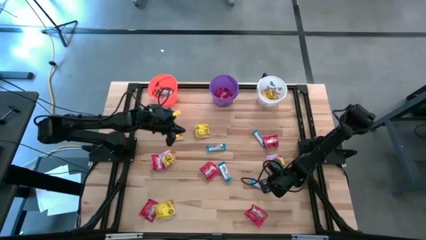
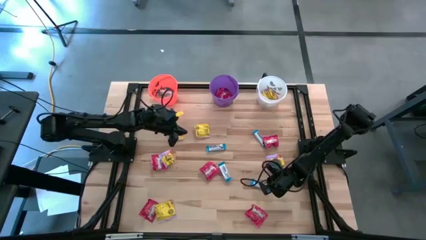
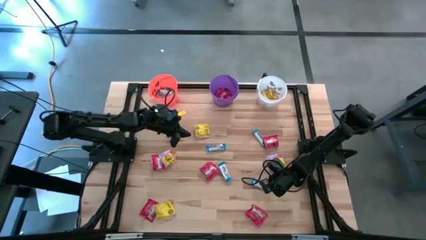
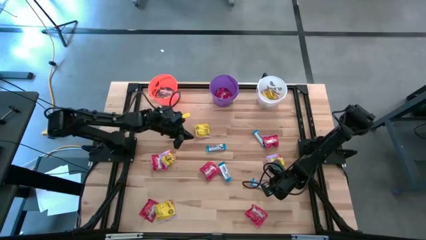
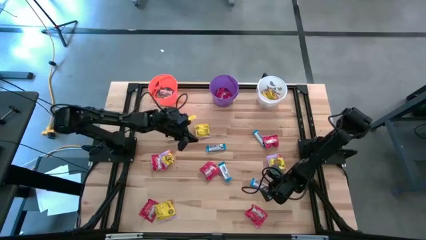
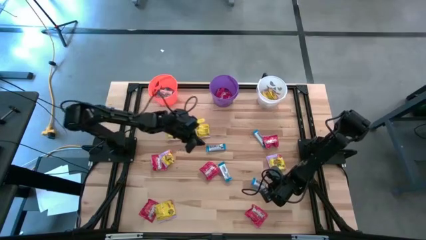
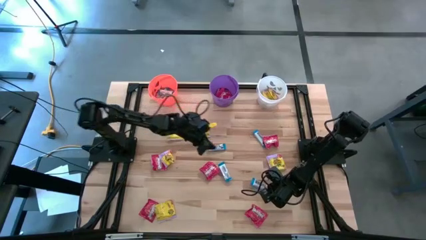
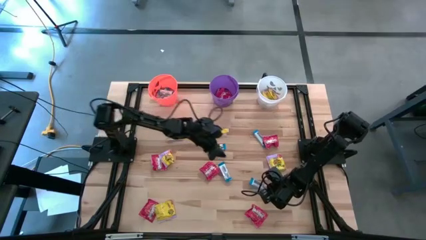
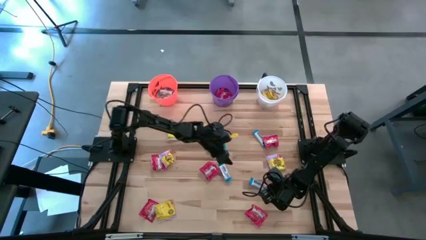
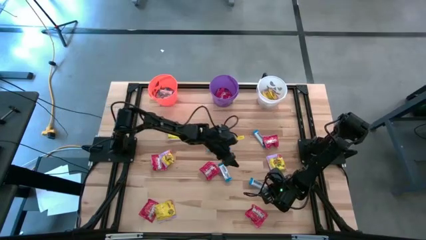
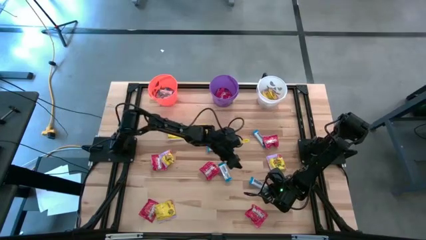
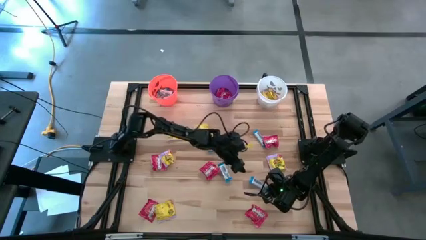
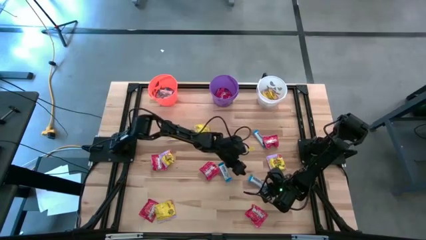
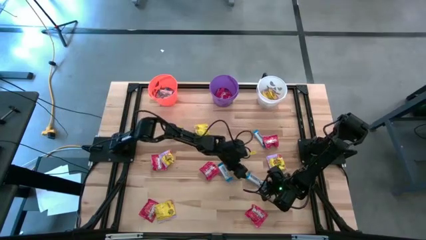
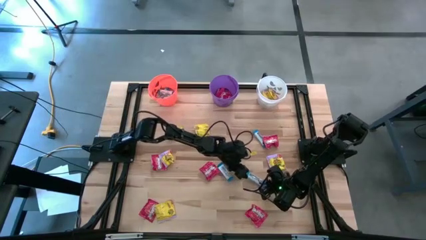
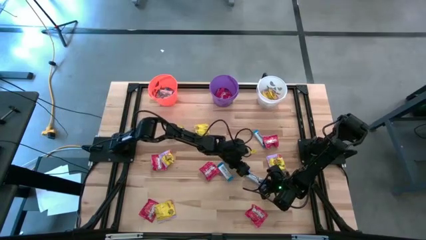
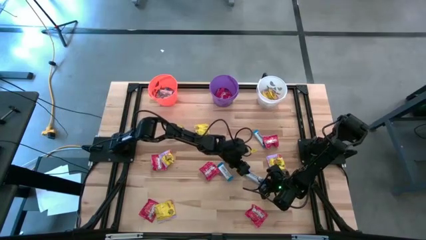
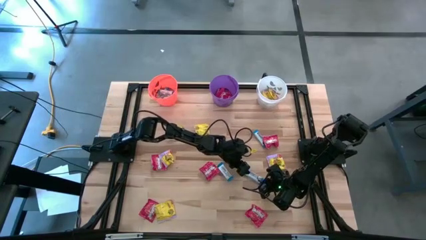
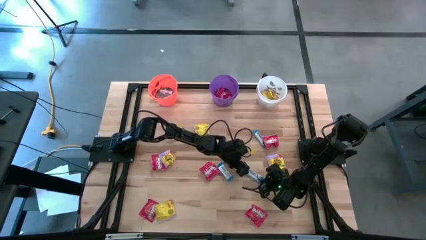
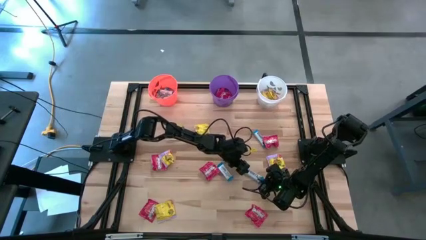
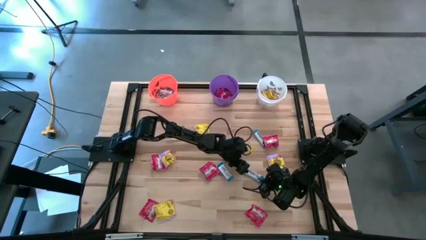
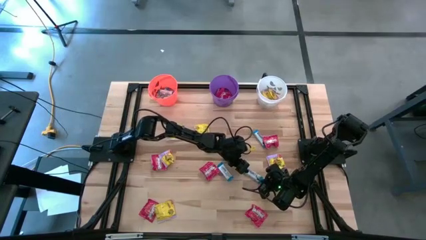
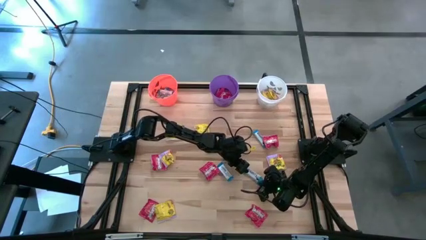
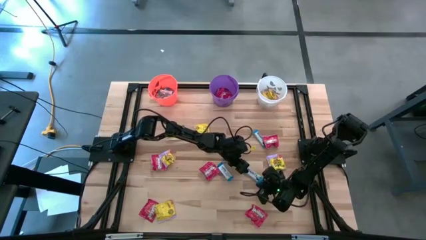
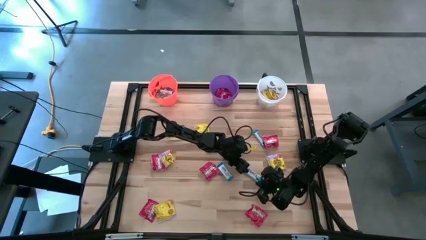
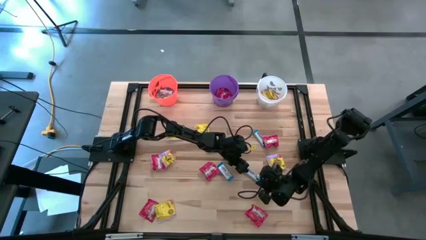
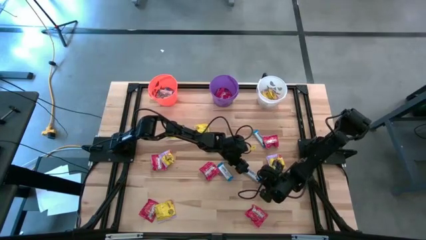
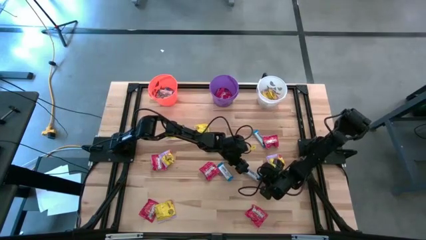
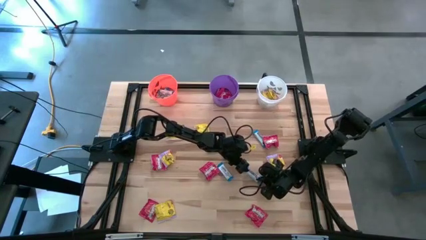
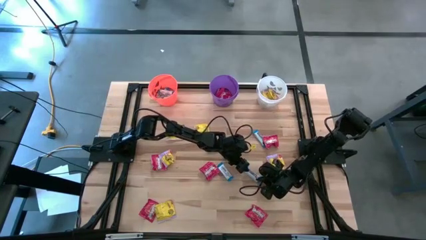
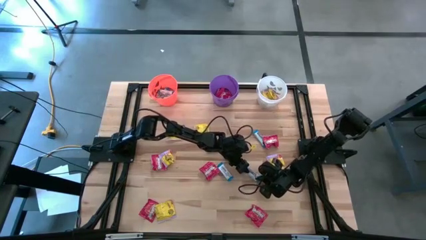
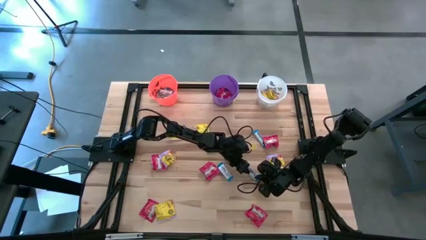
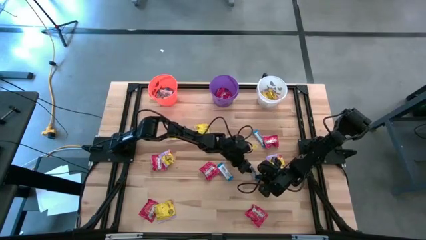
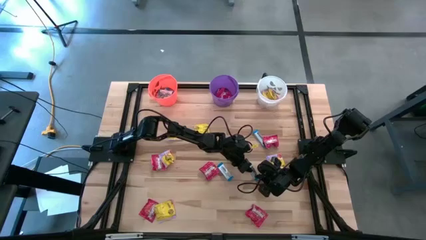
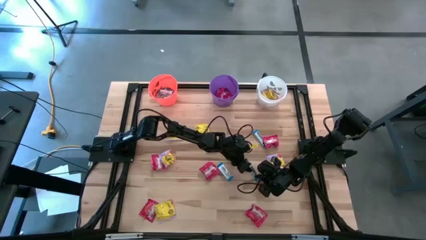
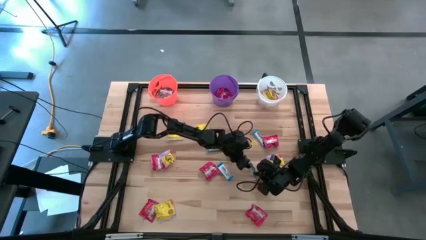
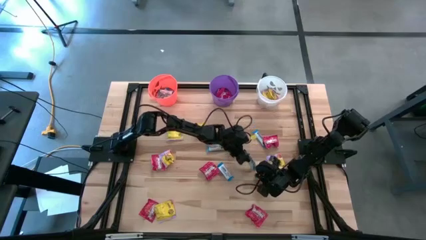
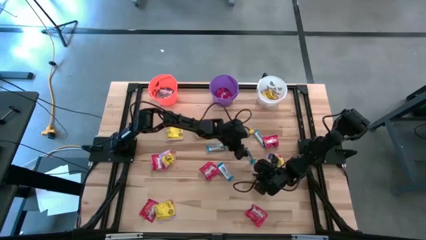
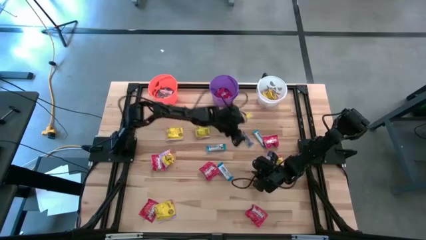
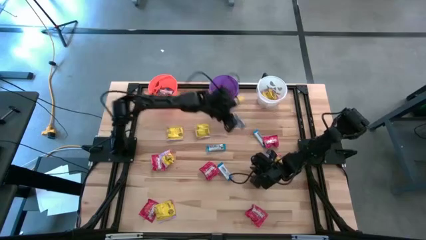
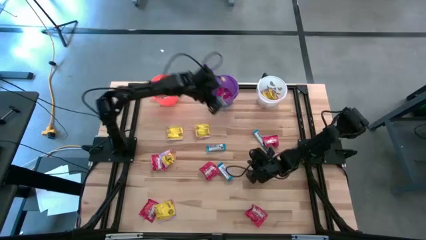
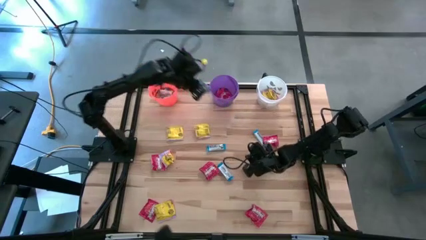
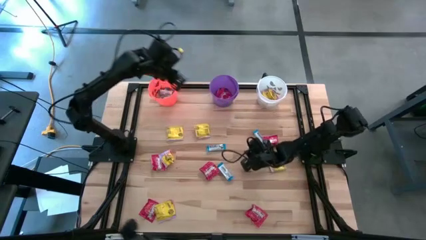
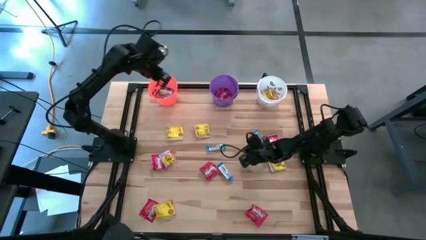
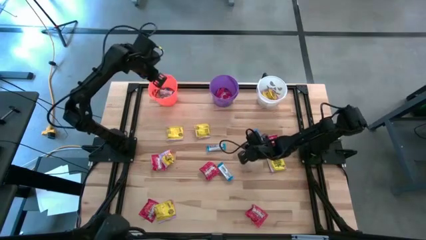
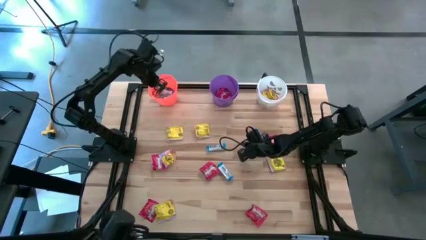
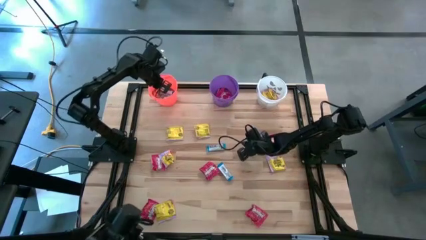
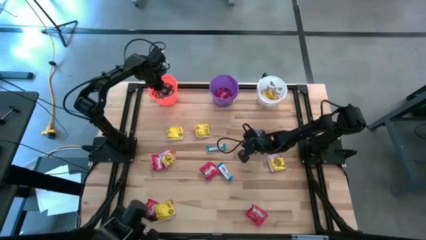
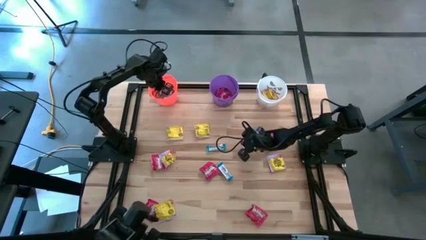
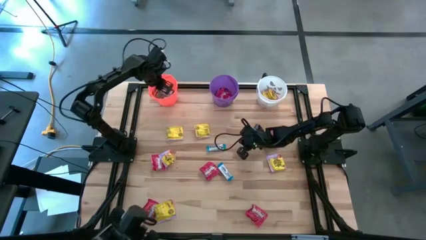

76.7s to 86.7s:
Task: Sort candy
Put the white chocolate bar into the orange bucket

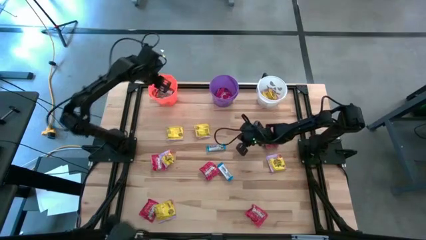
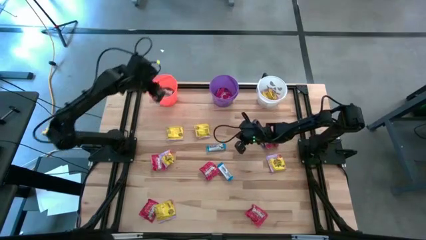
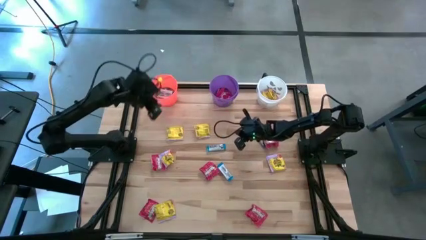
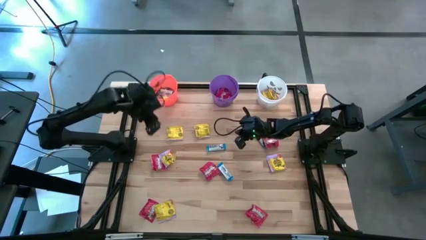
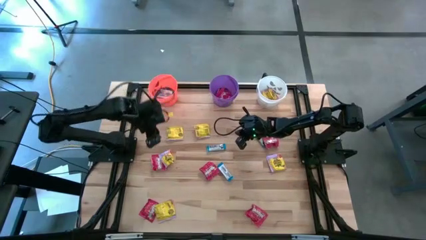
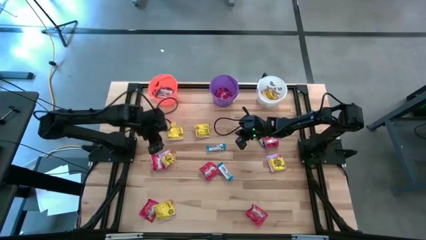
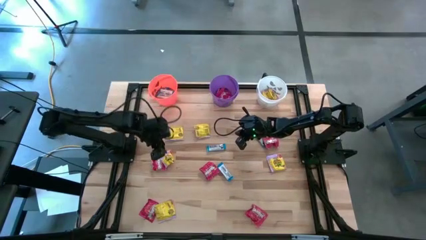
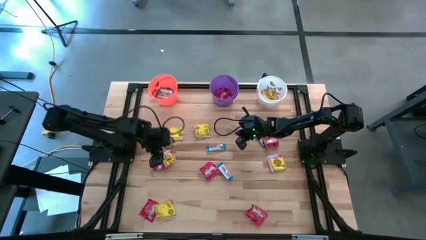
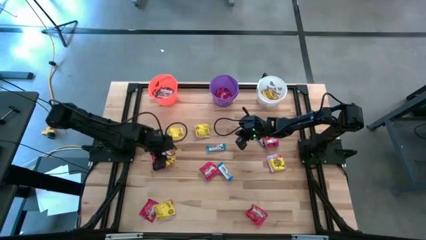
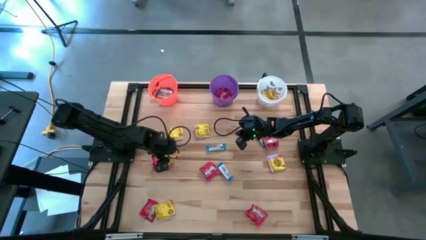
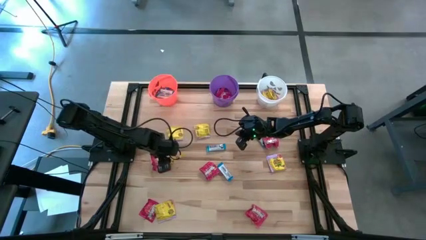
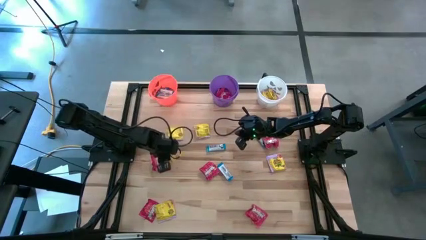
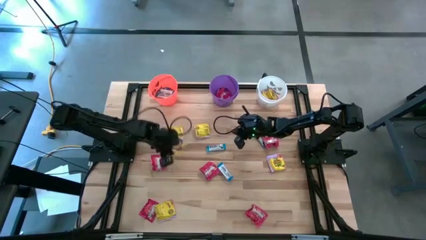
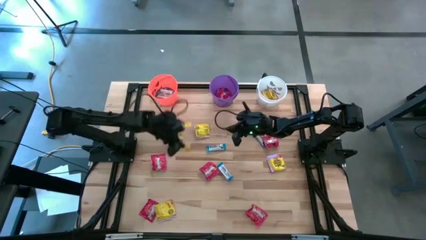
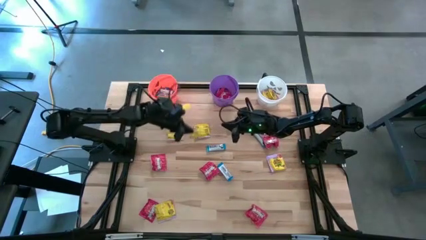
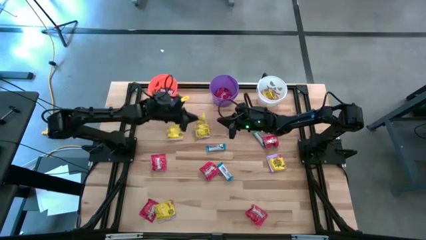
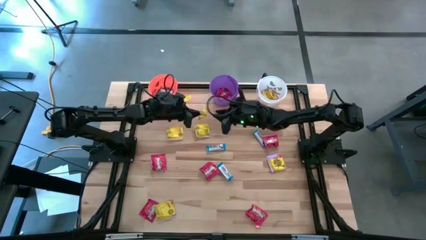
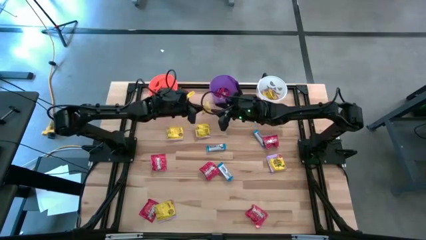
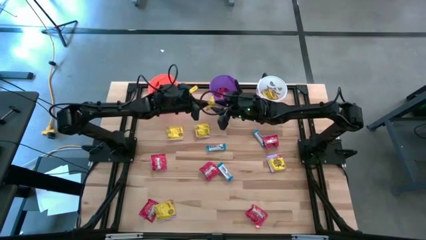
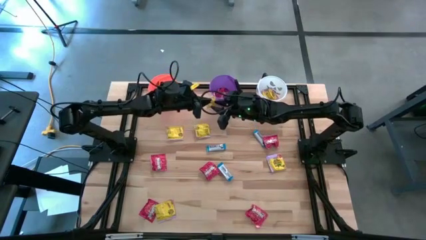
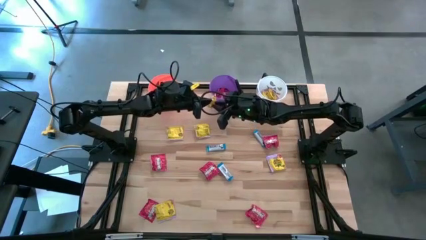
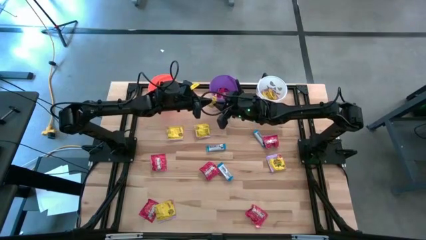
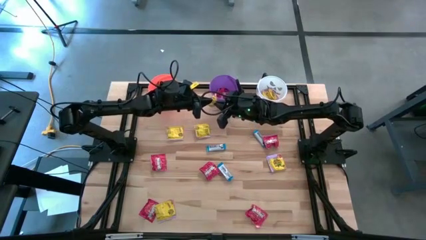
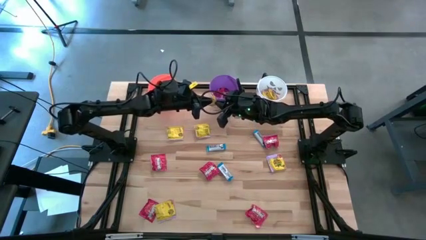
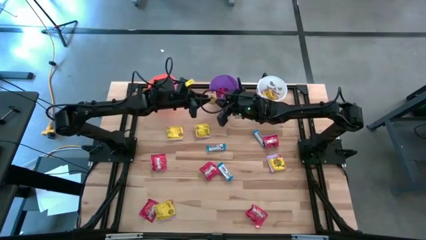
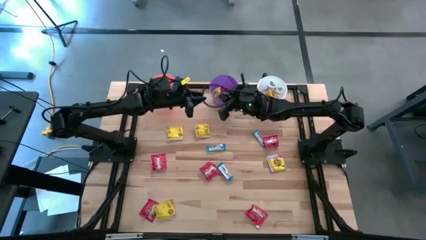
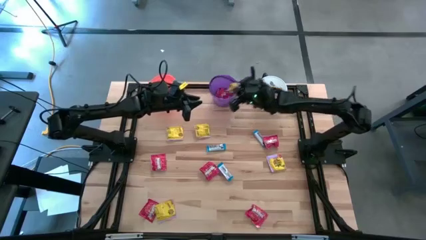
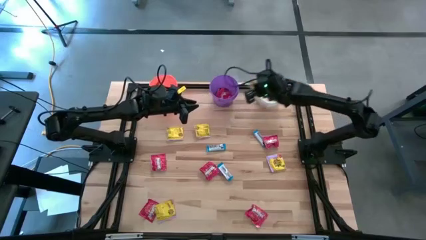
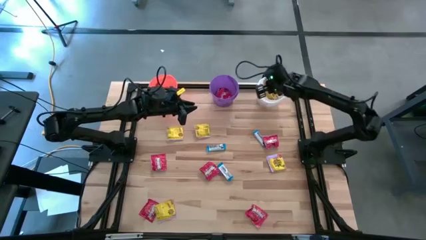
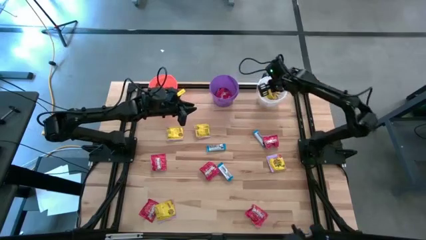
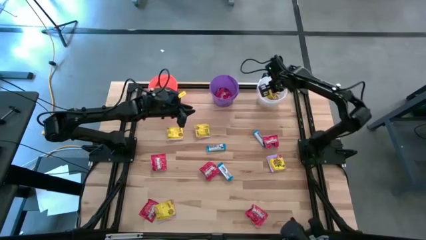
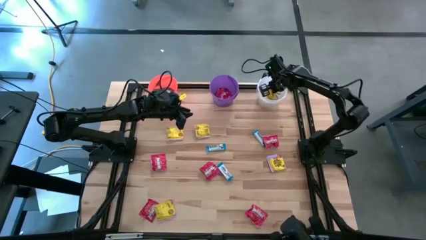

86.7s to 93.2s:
Put the yellow candy into the white bucket
